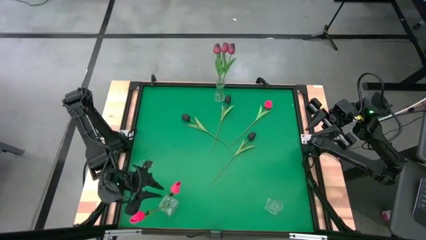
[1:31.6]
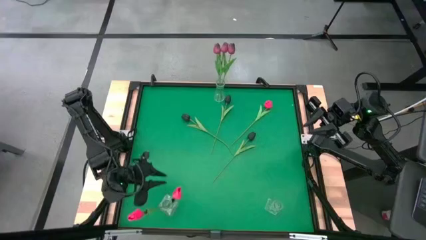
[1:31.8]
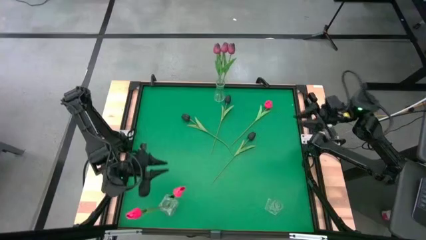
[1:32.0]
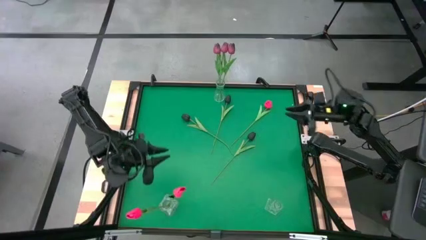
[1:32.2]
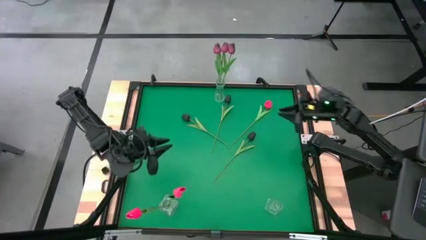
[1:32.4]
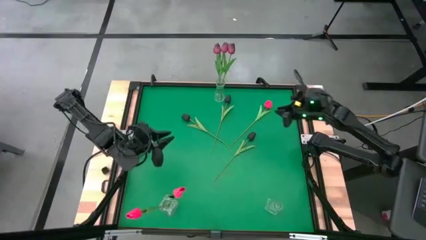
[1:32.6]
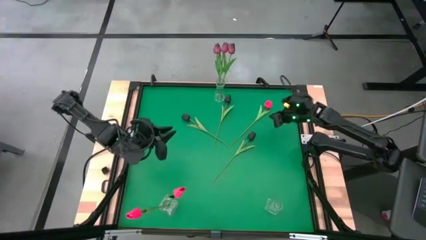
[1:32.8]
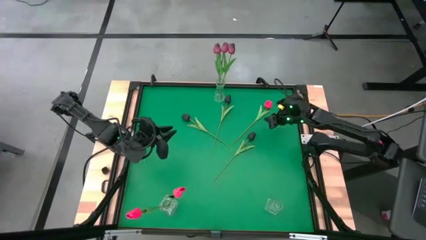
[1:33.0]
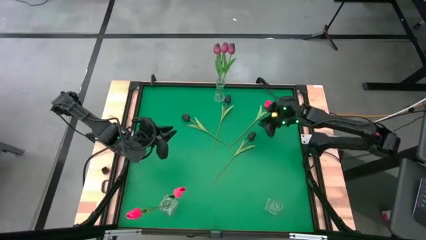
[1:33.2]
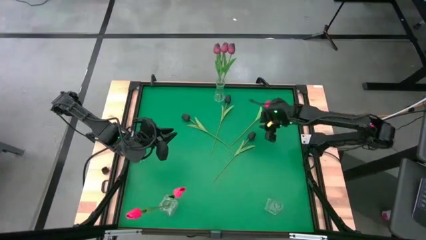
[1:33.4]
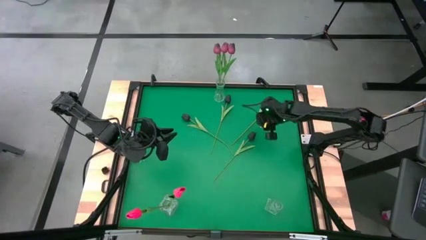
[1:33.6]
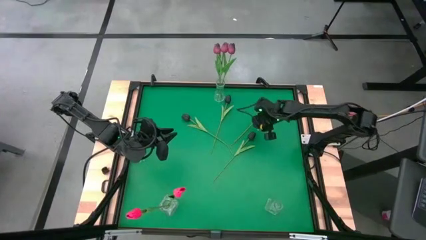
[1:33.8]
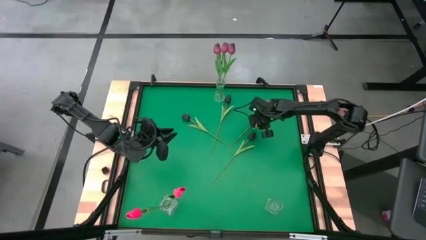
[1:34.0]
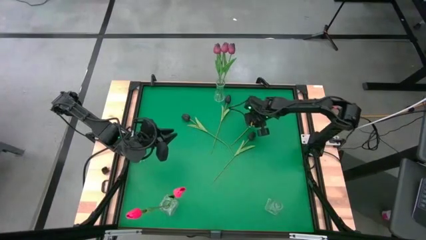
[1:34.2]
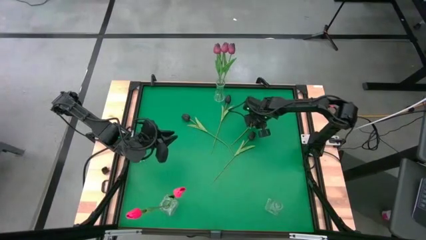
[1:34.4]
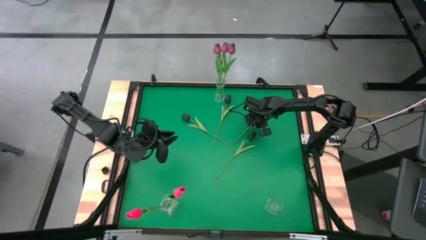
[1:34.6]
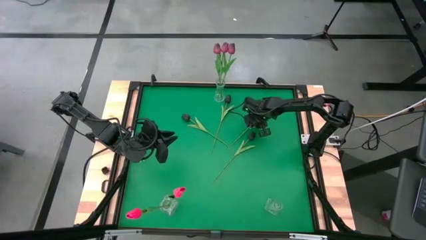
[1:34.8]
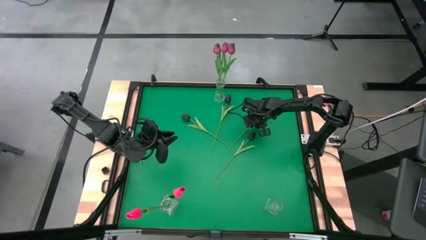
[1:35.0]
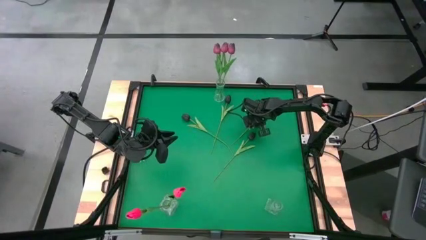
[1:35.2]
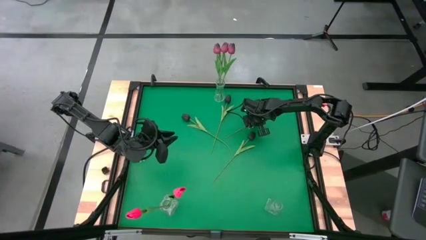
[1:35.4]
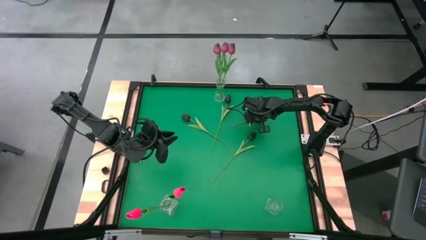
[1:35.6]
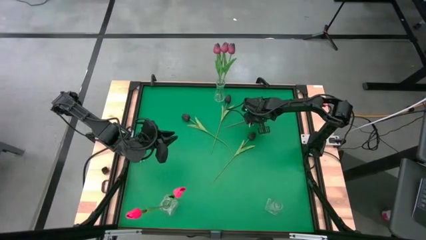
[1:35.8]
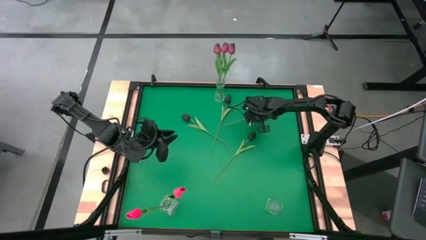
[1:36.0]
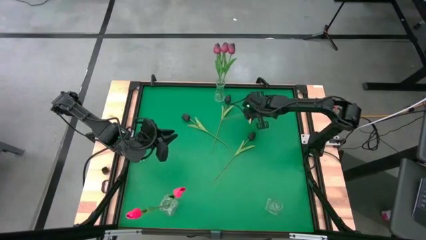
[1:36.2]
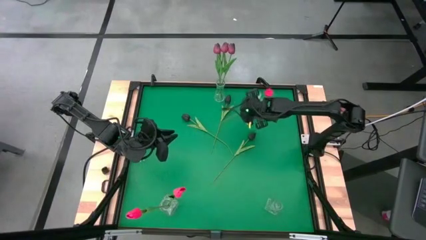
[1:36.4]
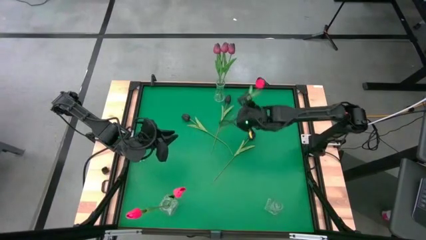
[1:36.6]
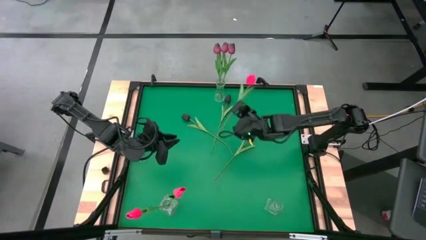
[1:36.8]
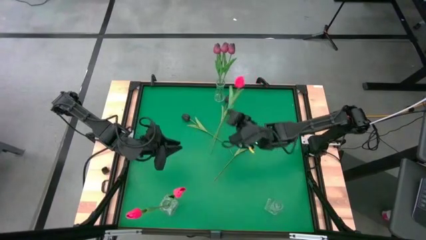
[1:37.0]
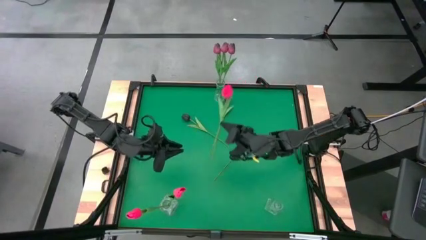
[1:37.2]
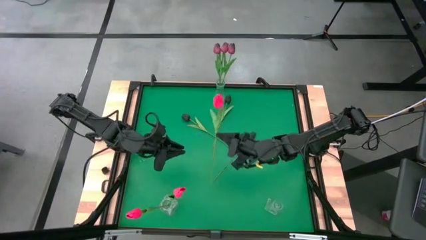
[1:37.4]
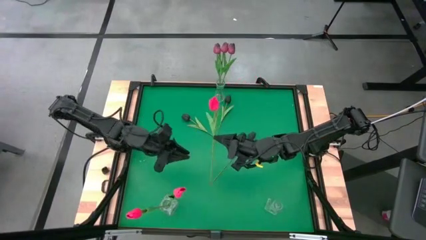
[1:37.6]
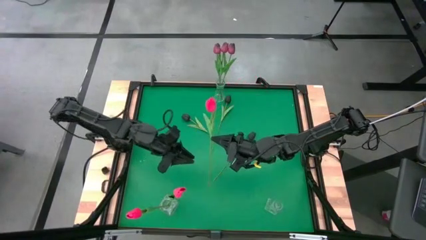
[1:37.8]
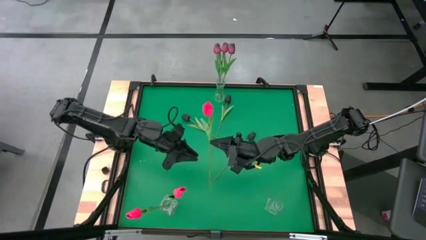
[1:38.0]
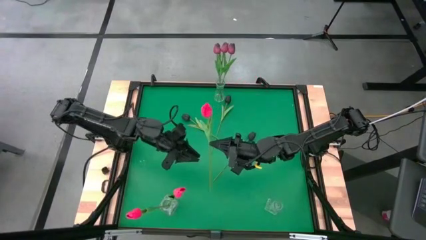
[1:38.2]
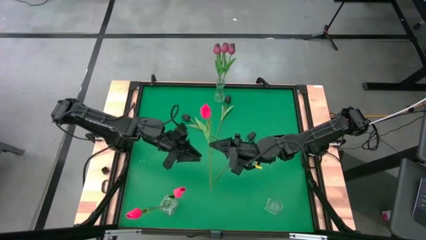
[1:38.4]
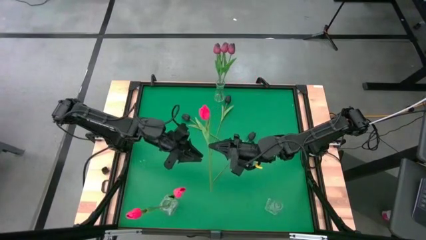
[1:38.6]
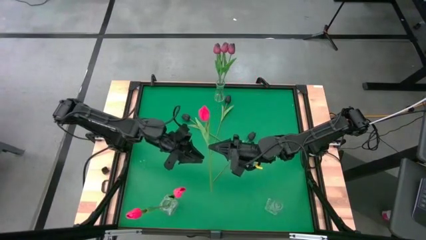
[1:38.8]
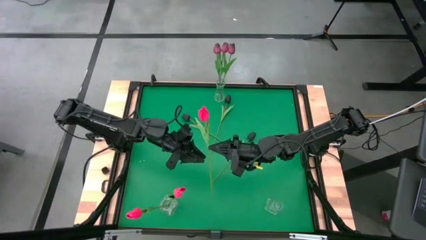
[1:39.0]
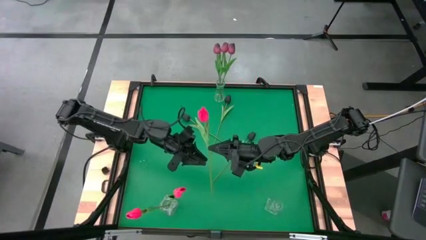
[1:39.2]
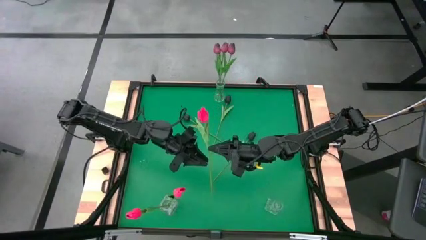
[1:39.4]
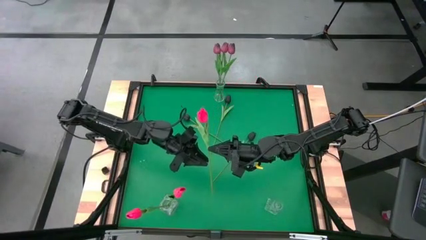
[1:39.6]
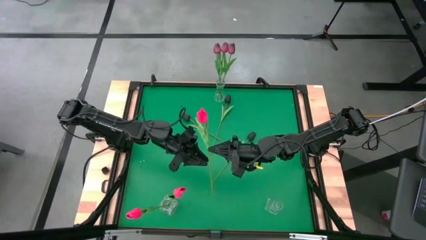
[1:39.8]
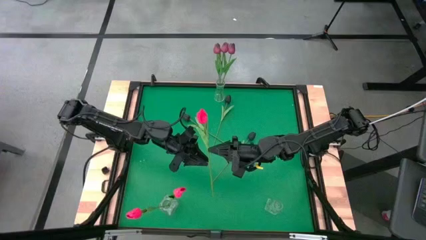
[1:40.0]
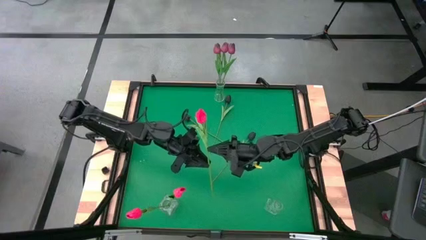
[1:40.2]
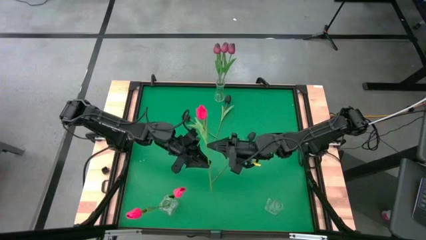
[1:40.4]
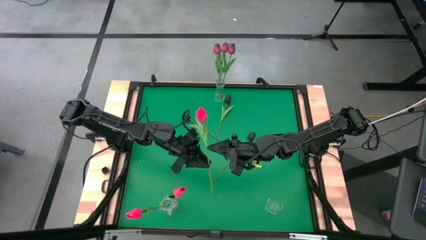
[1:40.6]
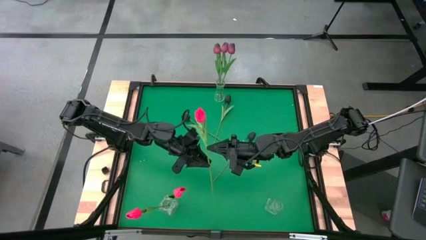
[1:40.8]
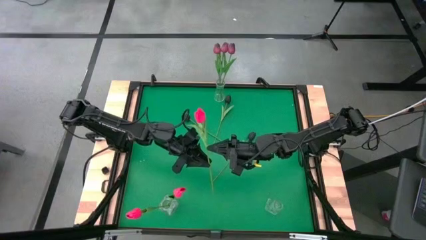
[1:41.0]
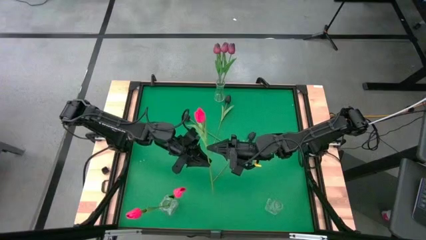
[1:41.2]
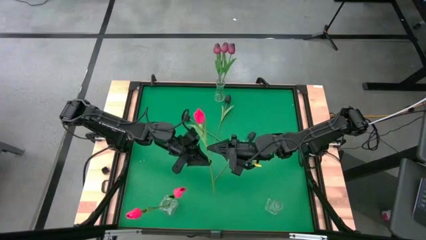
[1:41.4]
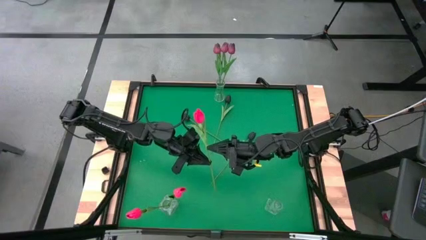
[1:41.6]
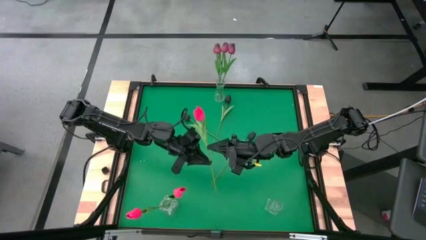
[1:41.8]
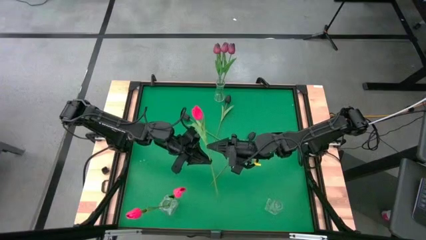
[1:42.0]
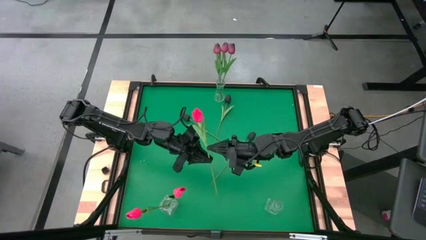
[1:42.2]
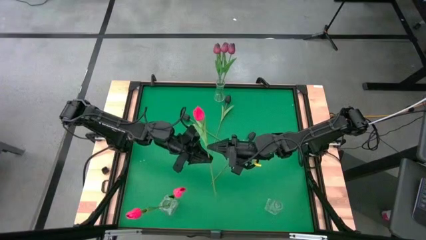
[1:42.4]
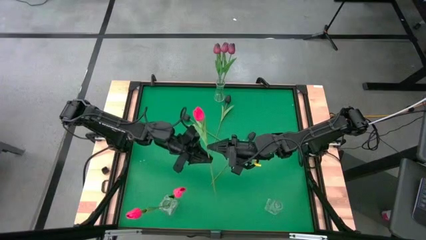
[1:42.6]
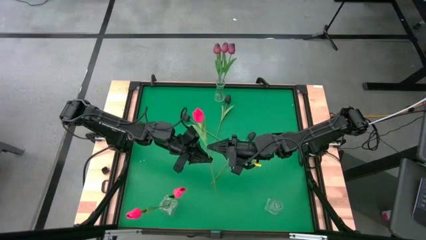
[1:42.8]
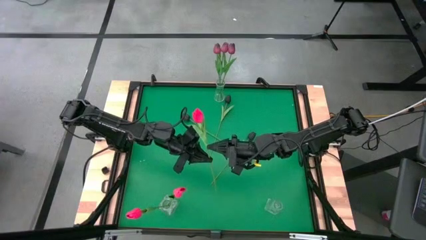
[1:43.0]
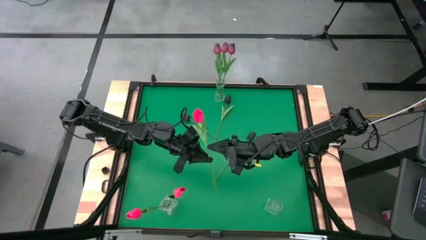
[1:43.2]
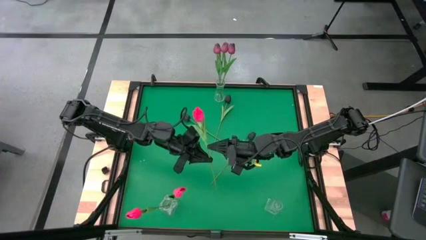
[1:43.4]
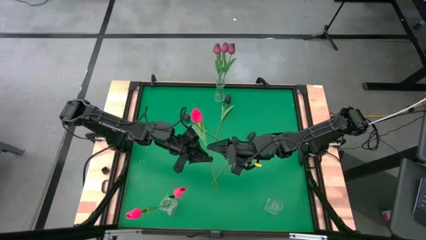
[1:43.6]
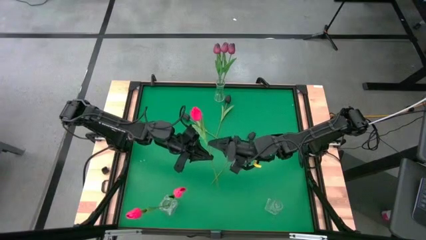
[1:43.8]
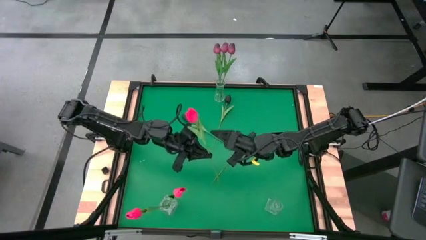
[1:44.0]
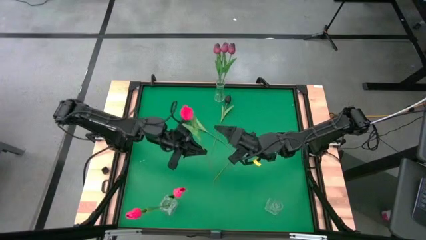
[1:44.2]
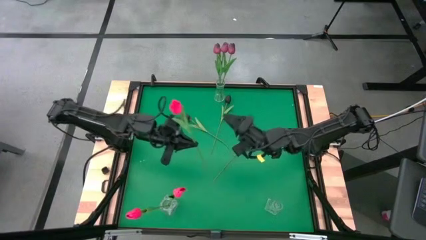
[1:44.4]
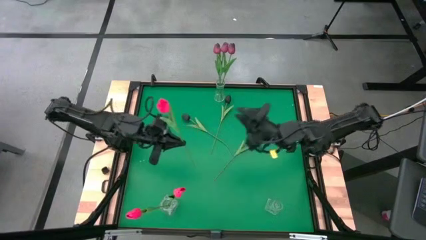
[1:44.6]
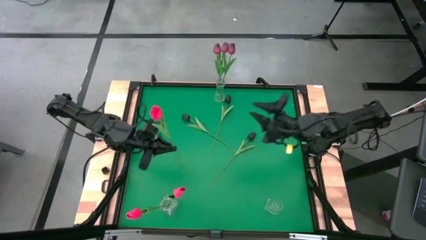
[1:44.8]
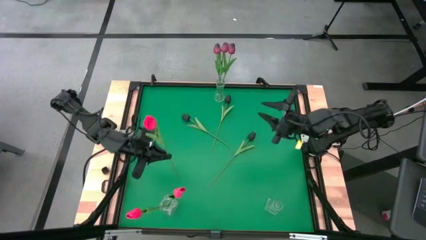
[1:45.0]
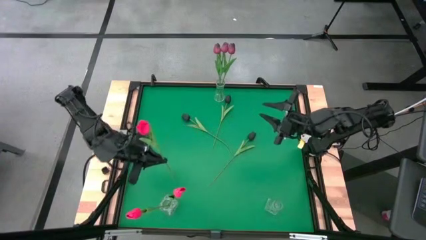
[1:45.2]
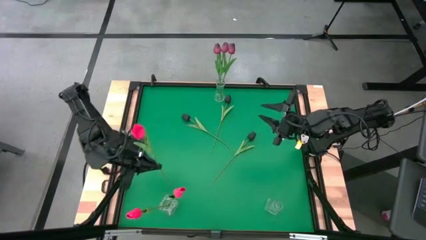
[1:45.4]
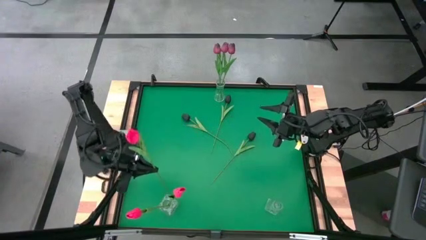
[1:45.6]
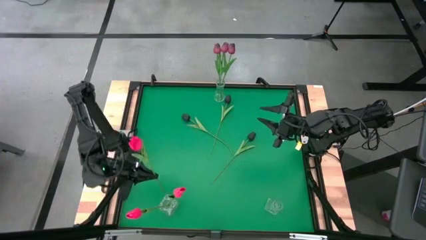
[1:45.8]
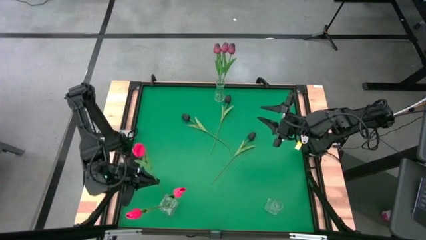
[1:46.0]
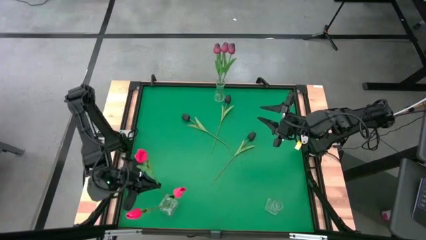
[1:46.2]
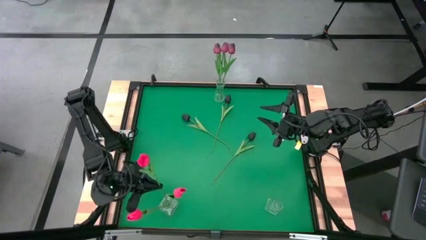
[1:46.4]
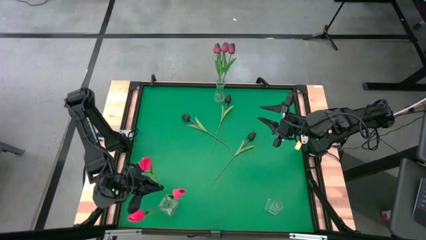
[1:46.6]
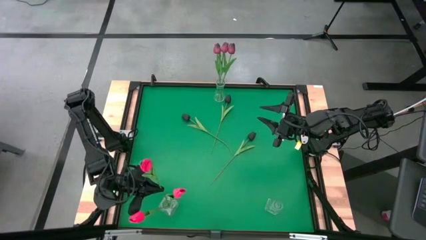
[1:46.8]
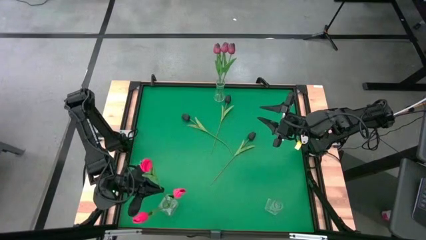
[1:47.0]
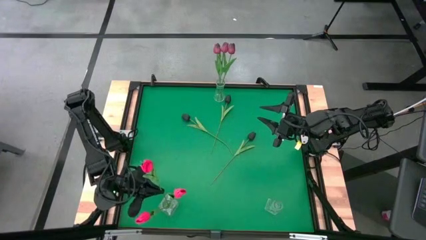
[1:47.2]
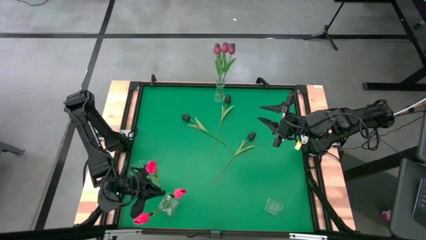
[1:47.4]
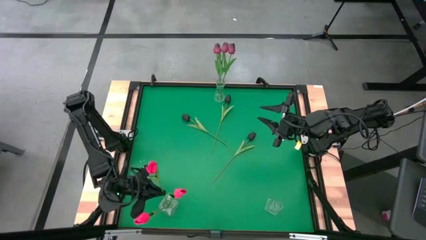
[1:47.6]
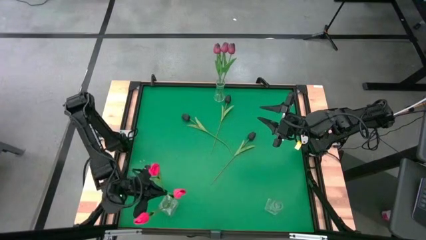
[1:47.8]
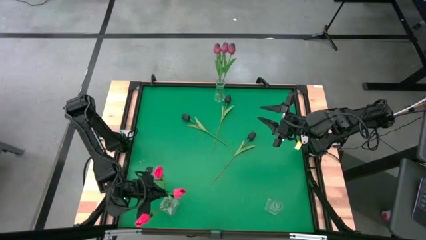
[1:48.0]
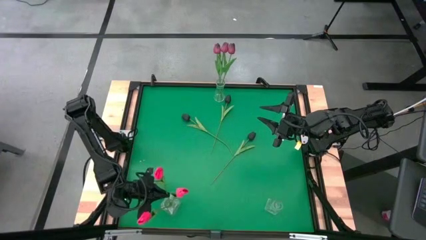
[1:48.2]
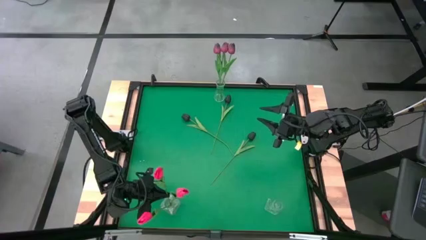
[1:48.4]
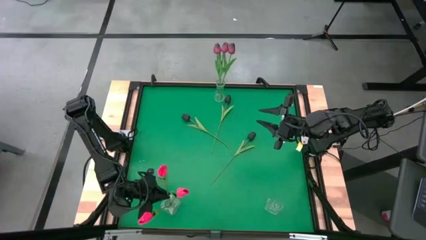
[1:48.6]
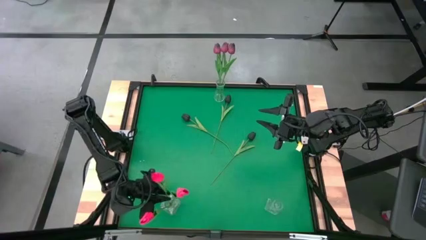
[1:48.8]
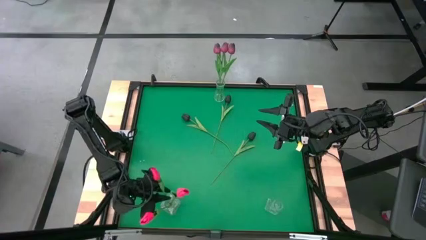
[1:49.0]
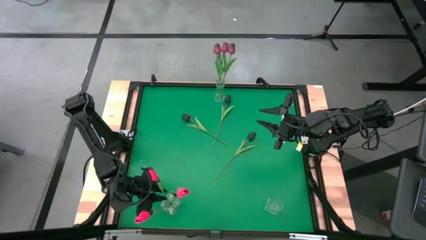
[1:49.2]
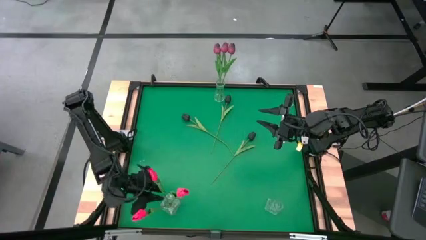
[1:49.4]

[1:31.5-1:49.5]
Task: Sort flowers into vase by color
Put the red tulip into the bottom left transparent vase
